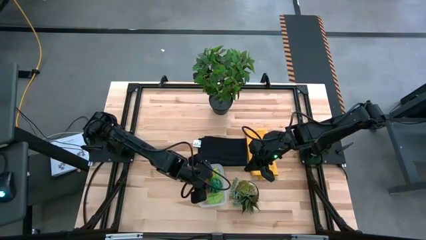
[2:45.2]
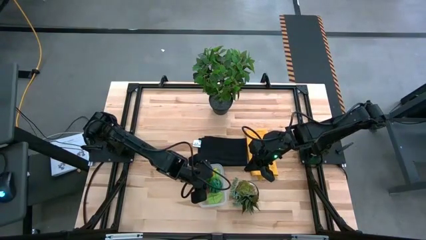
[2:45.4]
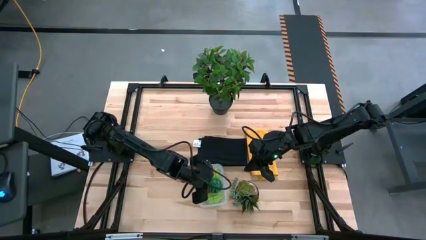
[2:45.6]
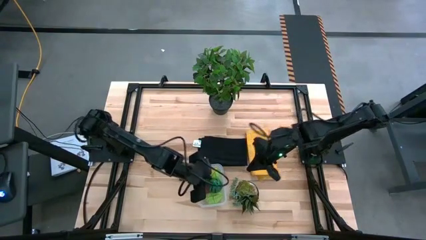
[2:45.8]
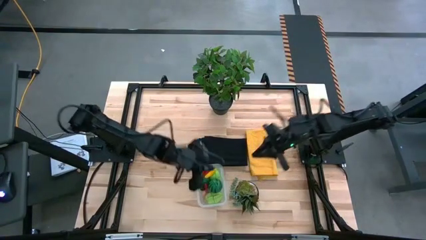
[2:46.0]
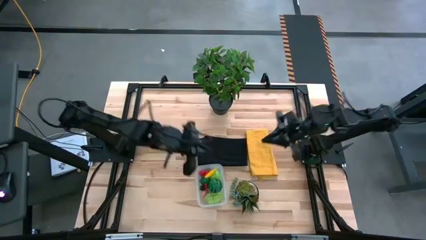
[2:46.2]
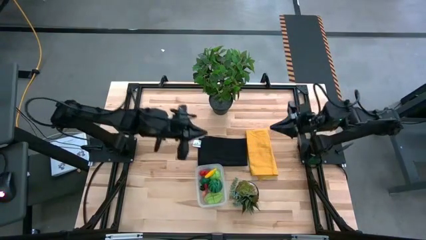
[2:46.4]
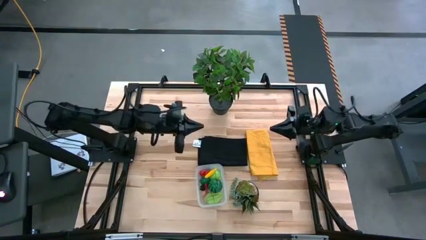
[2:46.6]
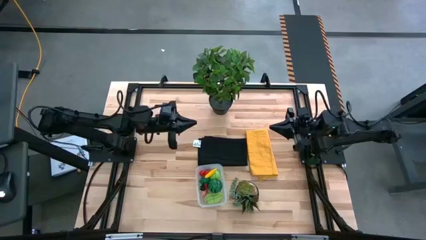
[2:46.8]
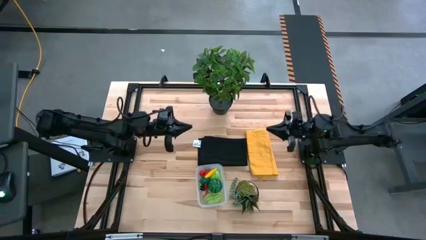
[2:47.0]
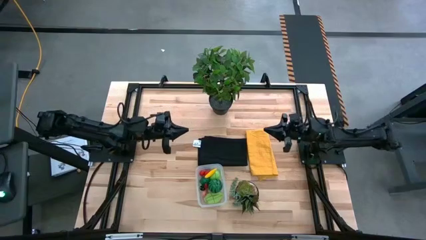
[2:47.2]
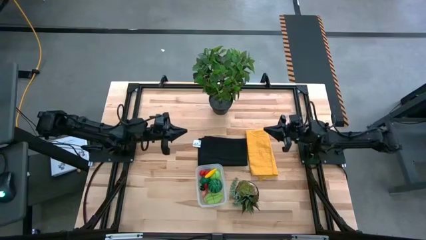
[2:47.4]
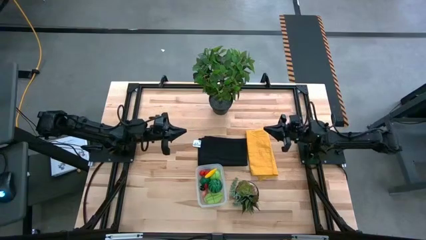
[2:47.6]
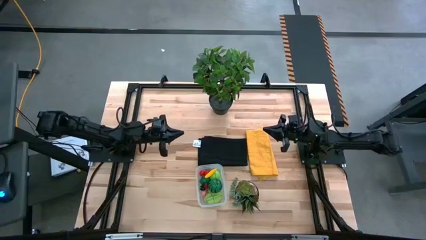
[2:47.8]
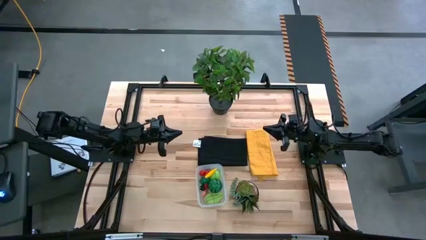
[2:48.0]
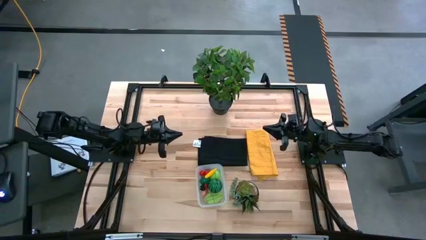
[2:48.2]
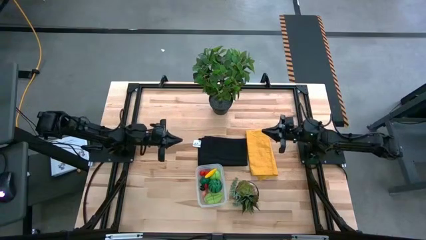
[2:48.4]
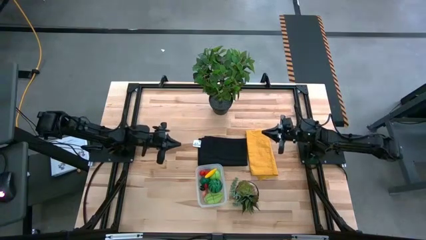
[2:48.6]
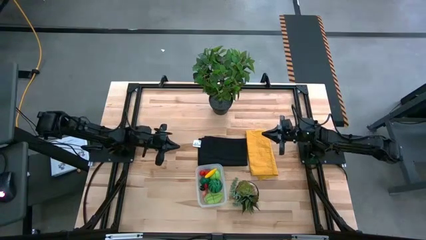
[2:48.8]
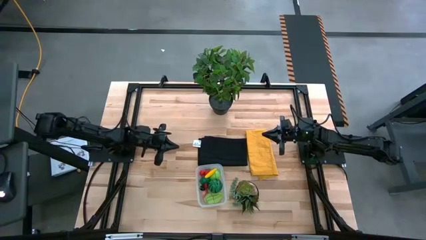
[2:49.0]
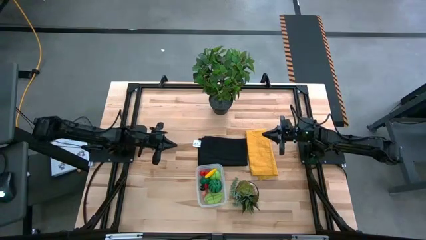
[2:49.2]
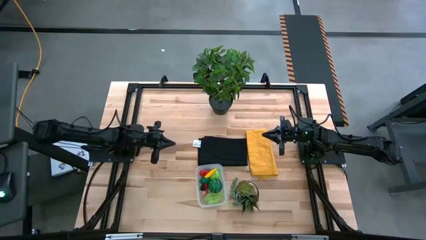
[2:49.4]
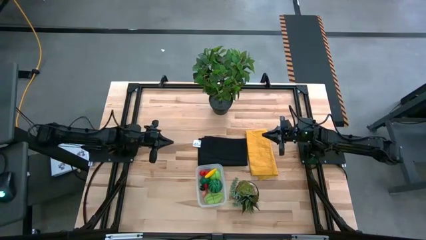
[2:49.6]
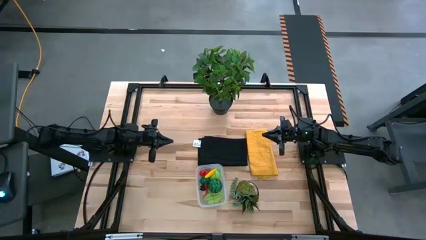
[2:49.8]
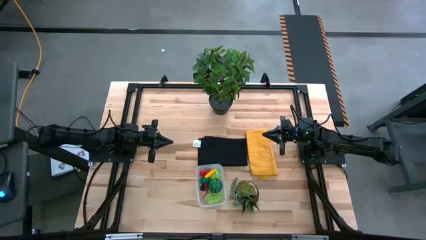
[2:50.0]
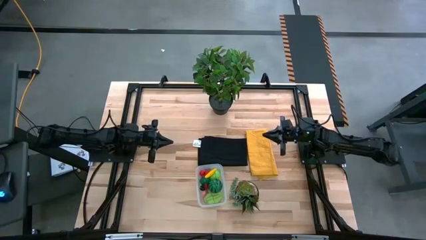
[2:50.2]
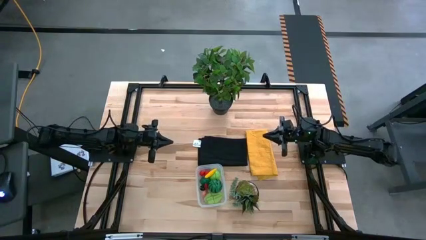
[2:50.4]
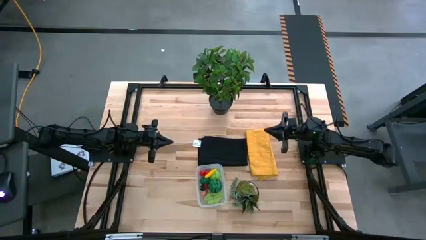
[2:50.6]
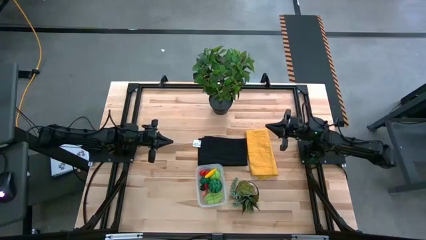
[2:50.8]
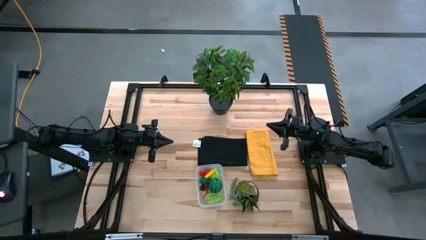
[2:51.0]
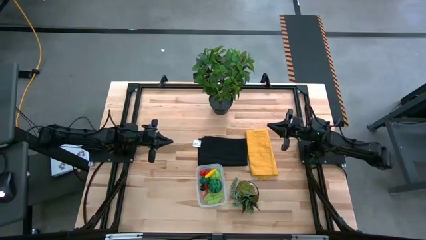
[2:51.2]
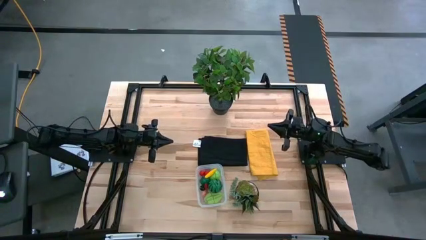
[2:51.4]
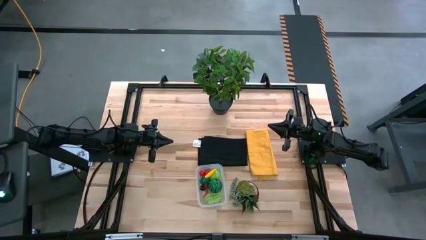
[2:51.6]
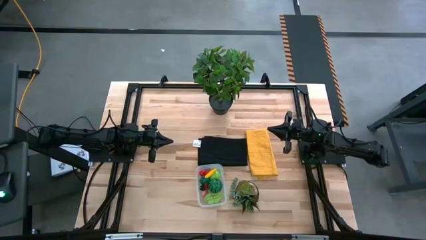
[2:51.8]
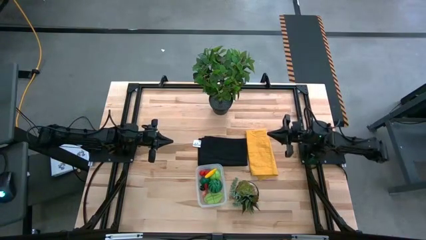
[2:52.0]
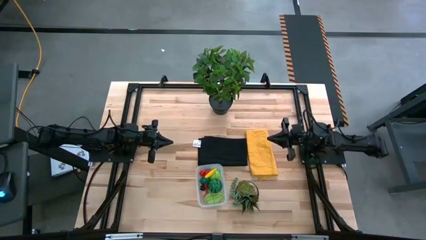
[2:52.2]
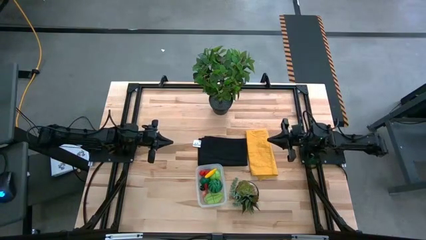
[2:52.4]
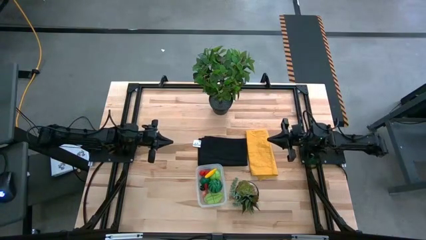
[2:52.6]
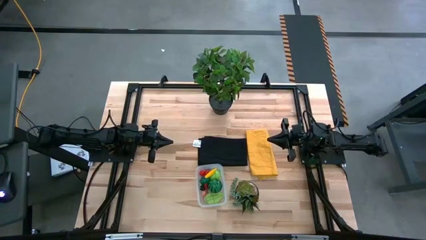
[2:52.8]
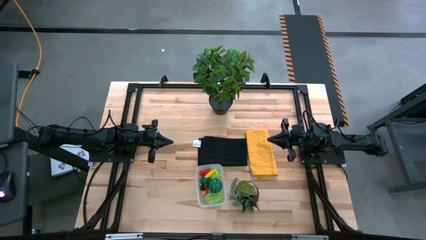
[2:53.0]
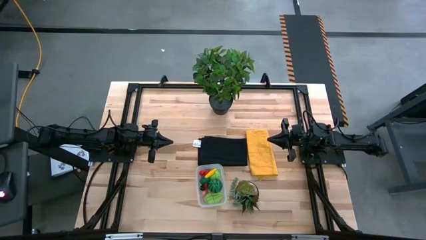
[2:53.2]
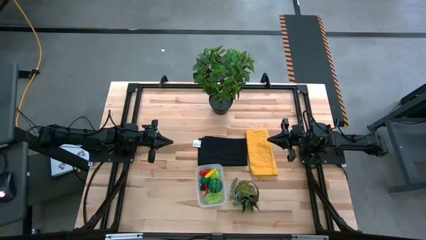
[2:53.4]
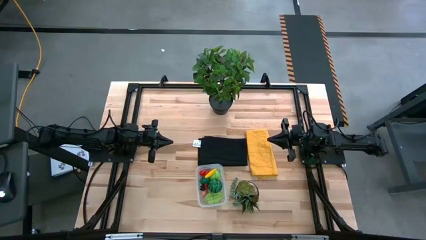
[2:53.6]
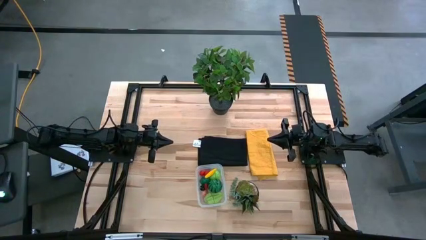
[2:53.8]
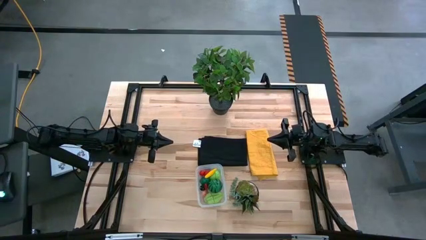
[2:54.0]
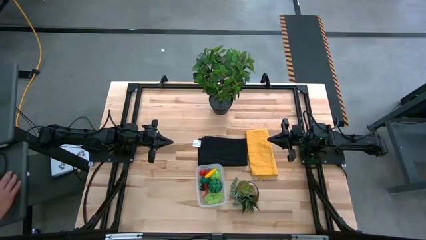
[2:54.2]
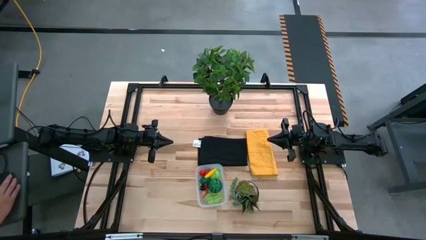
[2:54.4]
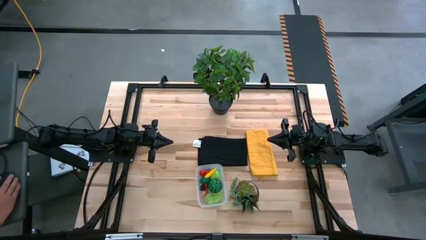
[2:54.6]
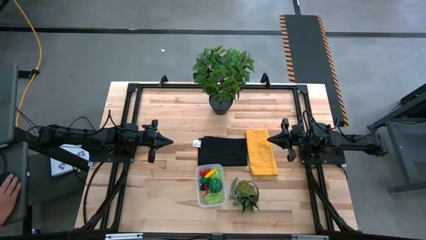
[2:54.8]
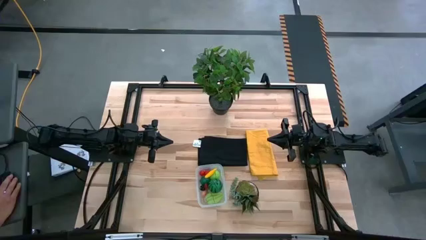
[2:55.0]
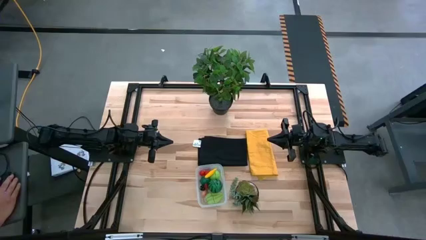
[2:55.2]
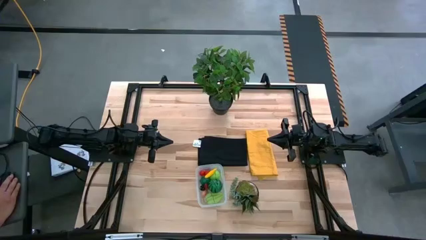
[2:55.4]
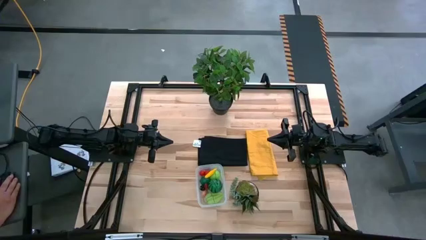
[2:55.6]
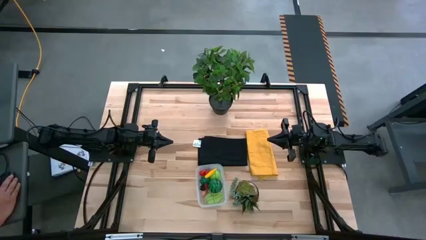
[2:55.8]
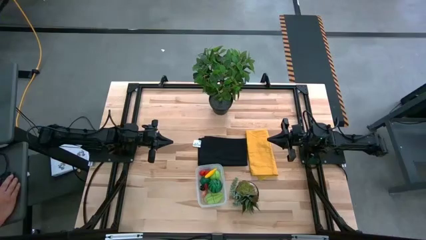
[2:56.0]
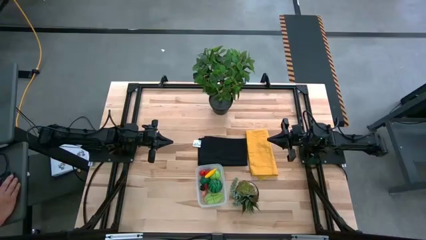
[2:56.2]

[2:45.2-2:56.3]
Task: Pick and placing Produce into tupperware
Return to Home Position

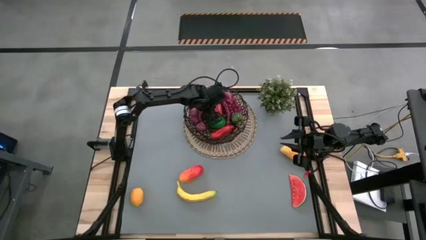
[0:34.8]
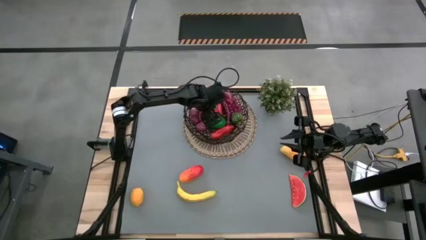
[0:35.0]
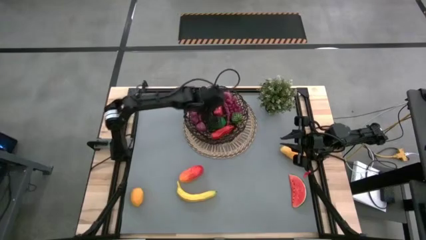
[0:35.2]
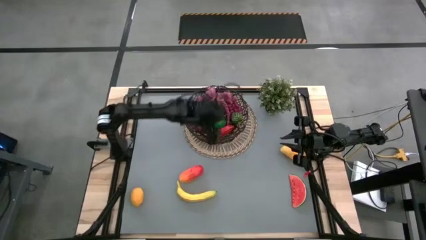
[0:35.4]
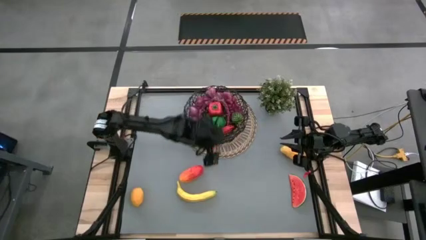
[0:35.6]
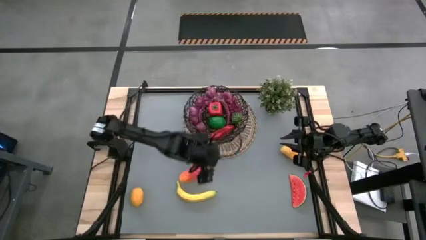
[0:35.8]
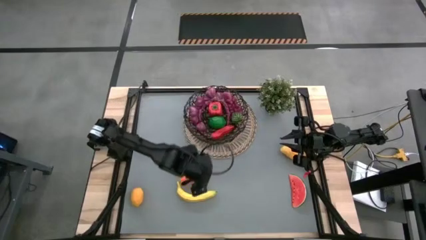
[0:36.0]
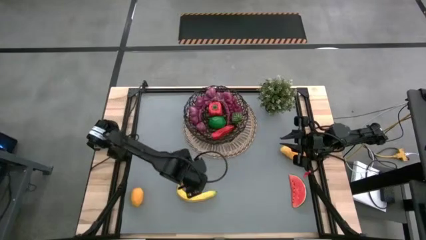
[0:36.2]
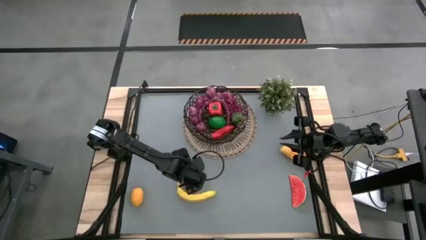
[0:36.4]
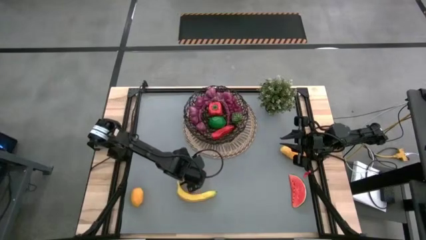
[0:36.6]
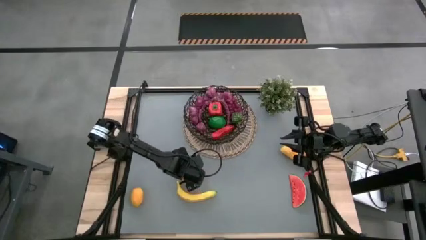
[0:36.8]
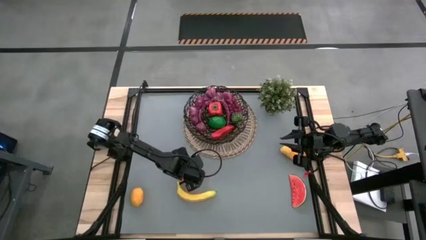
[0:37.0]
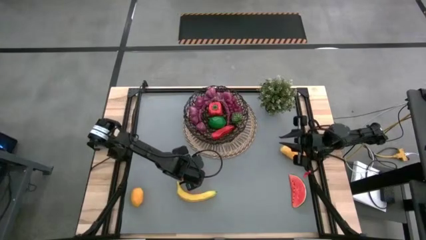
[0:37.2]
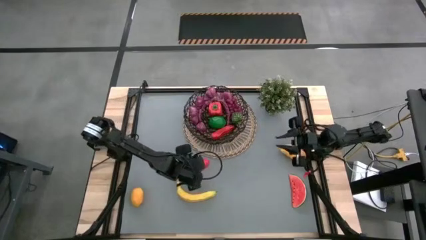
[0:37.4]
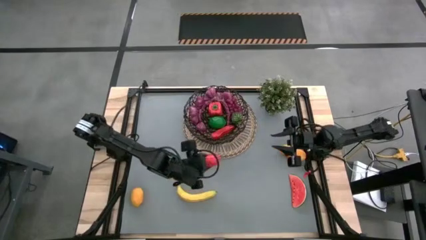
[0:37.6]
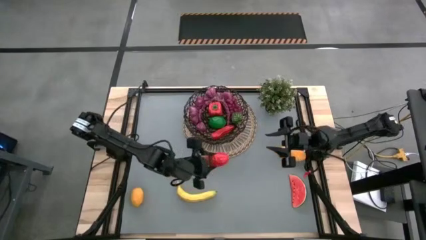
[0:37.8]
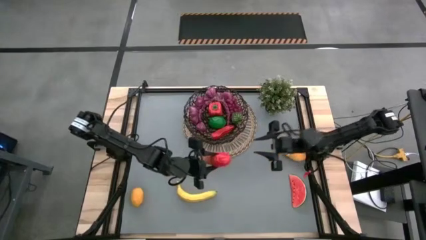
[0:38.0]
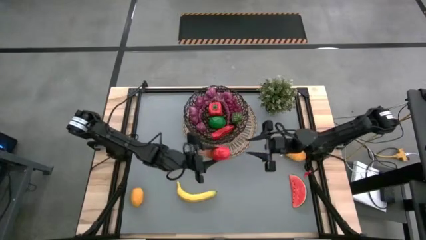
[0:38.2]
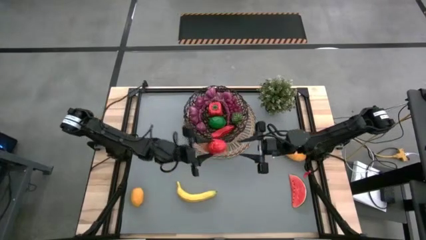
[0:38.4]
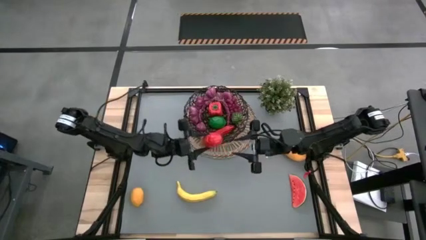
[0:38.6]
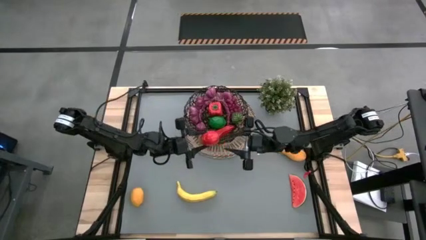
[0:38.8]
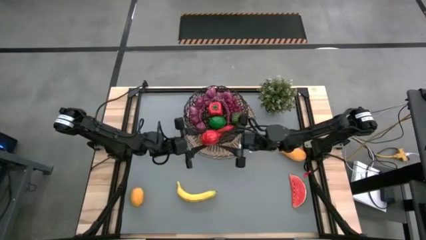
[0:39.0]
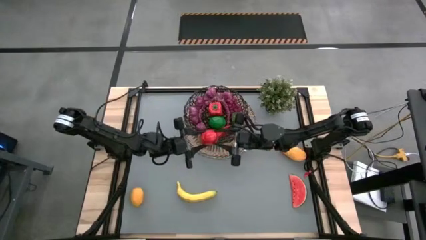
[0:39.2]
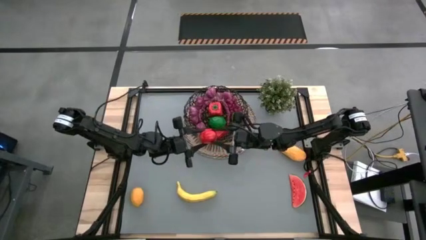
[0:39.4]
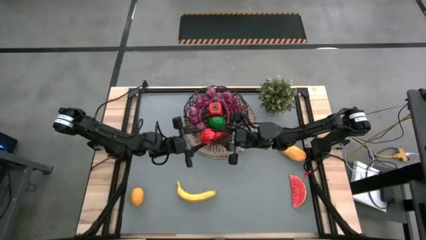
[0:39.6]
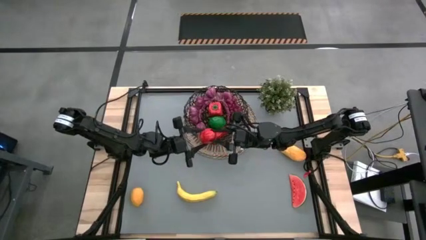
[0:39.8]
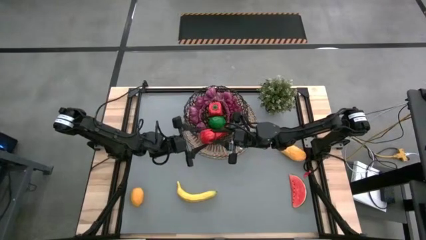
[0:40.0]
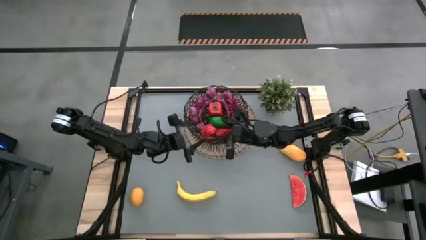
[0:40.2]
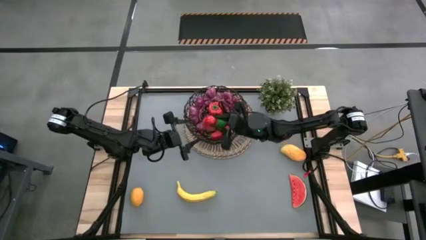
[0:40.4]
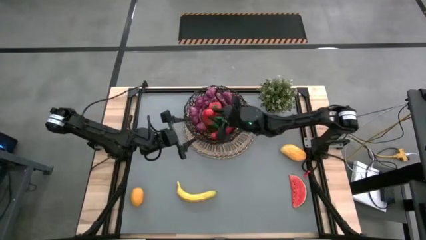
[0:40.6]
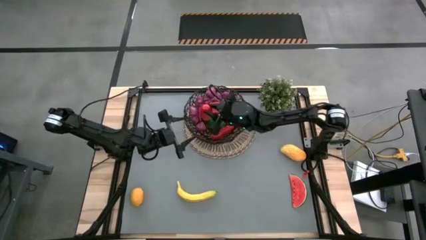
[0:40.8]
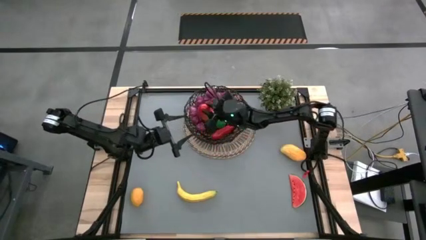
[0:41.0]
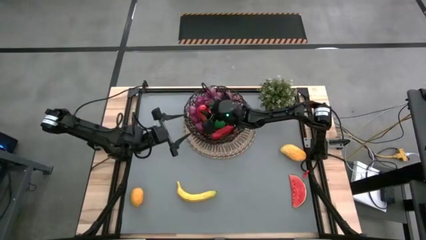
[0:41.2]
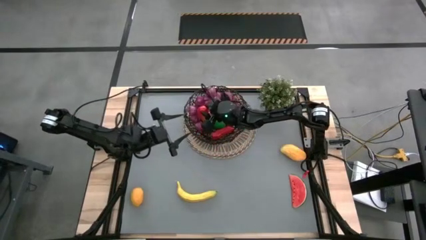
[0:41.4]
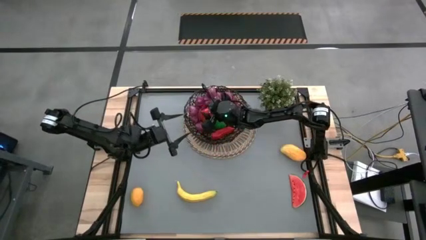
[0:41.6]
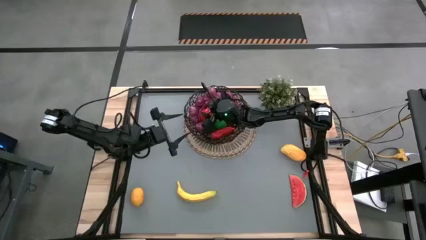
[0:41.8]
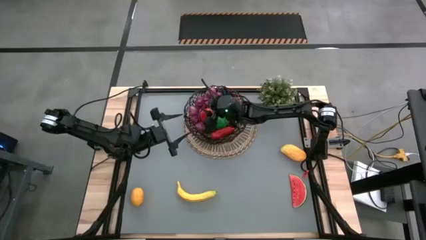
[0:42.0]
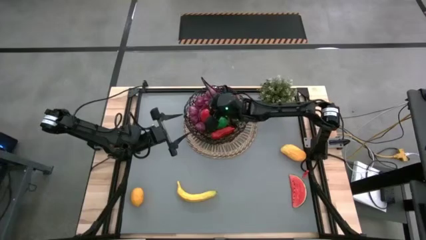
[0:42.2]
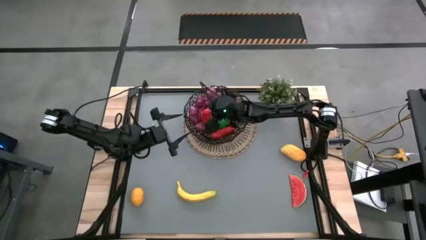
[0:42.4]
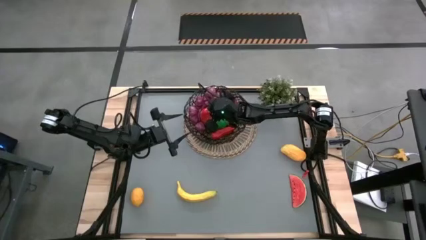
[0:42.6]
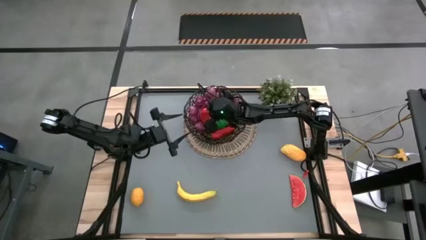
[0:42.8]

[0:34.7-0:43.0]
Task: Build produce basket
Put the red mango into the basket
